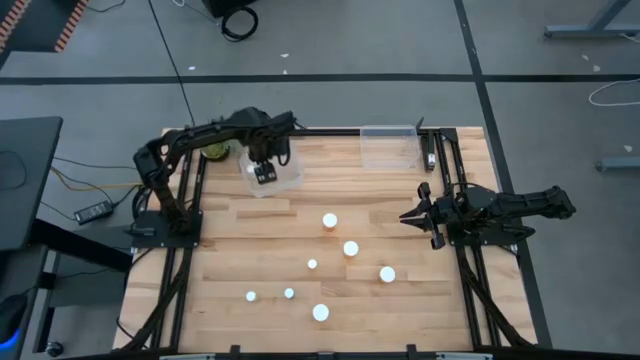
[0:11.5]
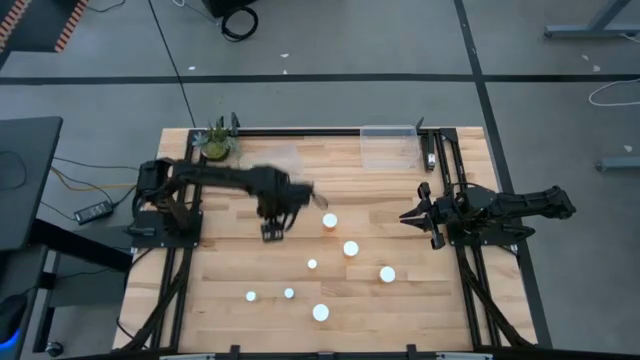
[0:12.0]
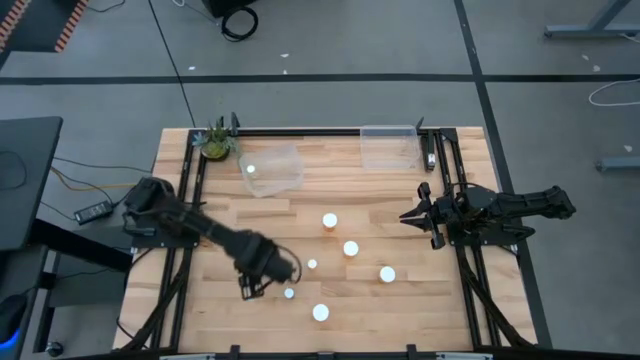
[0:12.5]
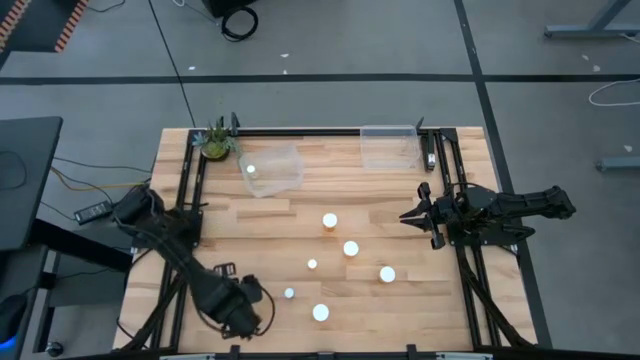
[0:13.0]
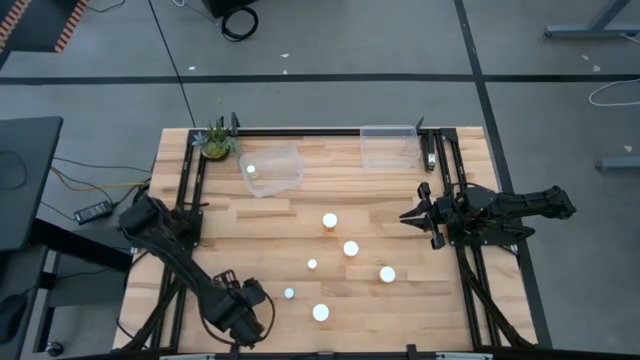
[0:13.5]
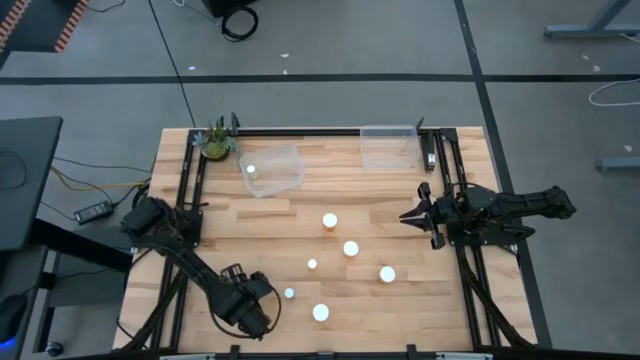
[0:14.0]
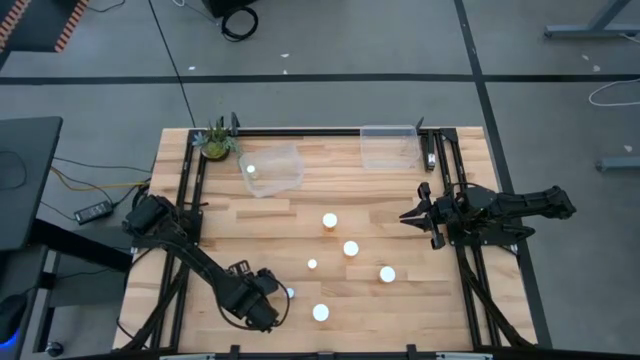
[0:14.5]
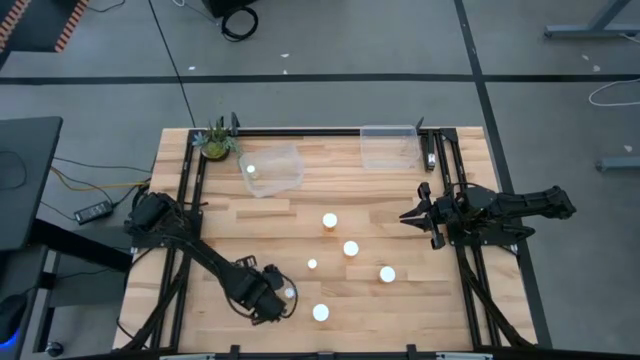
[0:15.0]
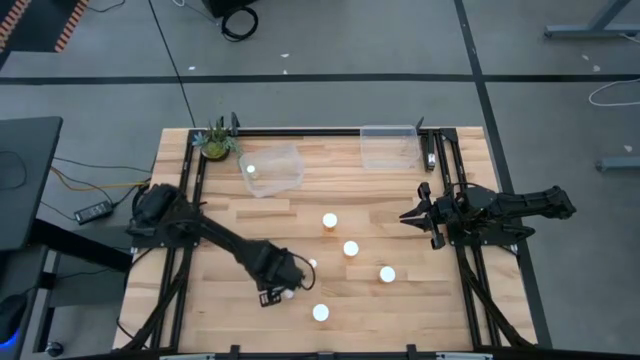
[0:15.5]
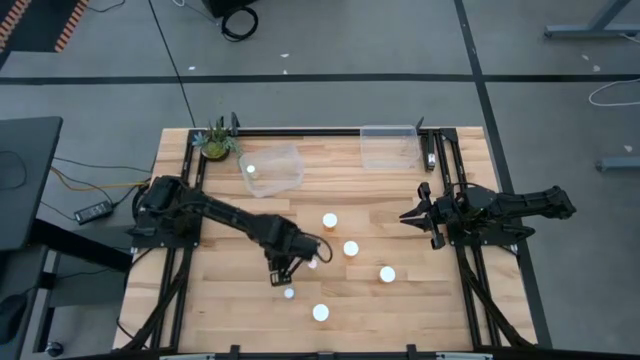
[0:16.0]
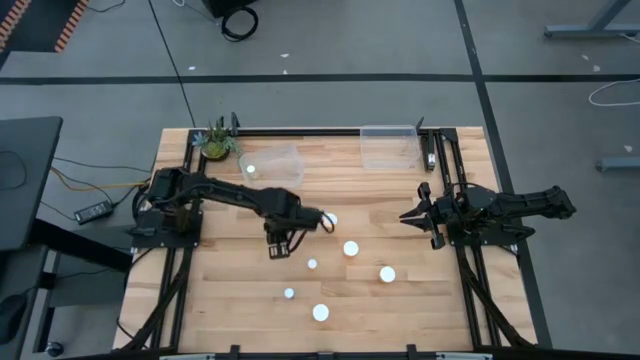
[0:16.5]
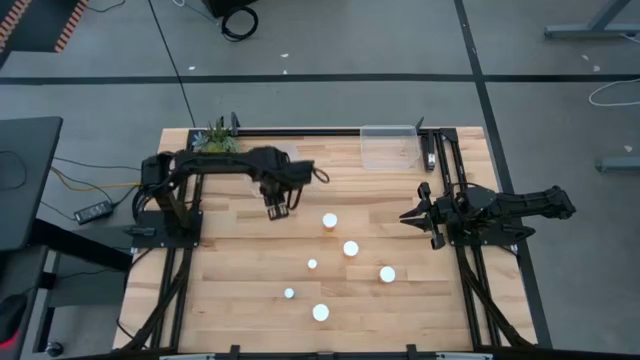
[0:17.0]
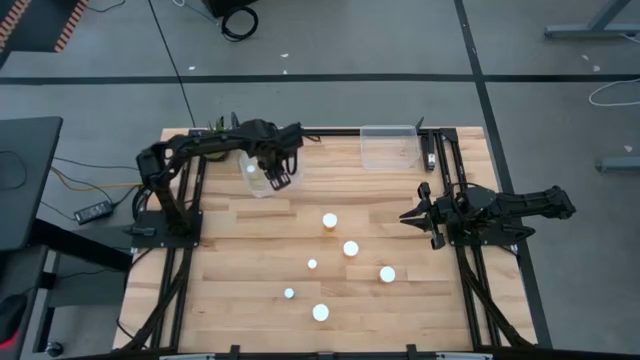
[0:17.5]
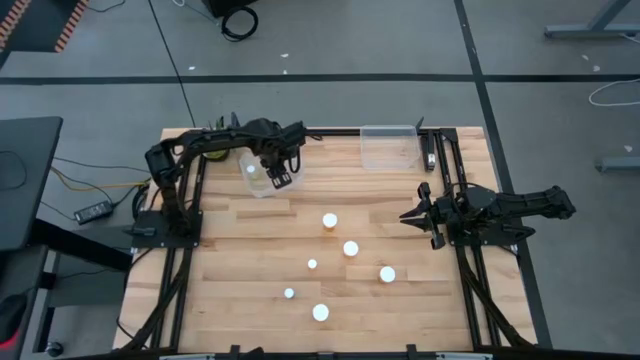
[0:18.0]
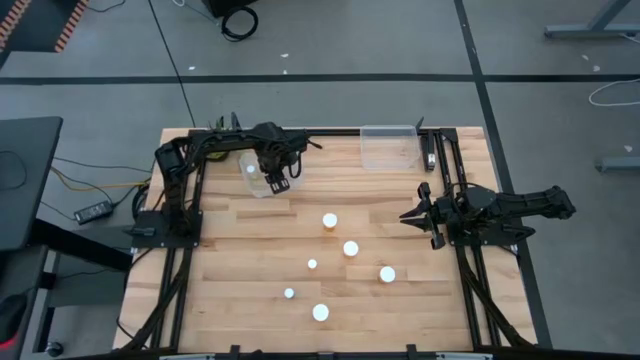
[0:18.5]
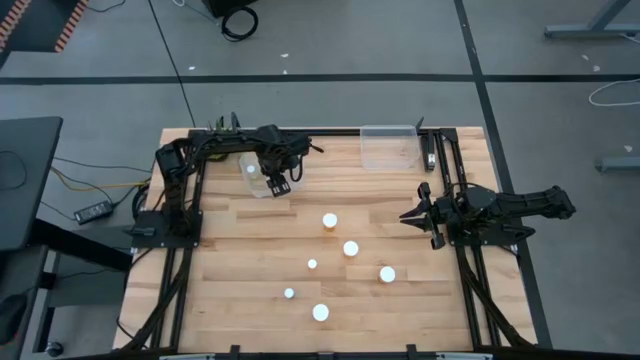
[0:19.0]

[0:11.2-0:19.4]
Task: Pick and place medicine bottles into bin by pill shape (circle, oval)
Put the small yellow pill bottle into the left transparent bin

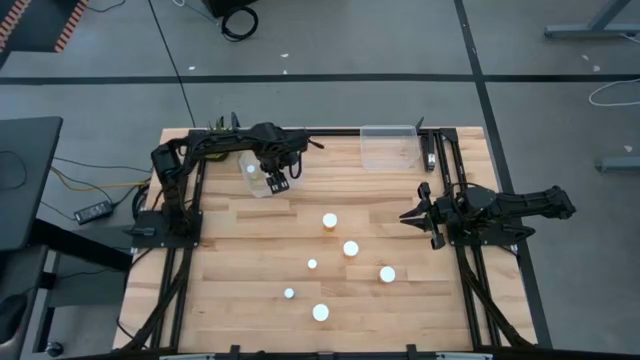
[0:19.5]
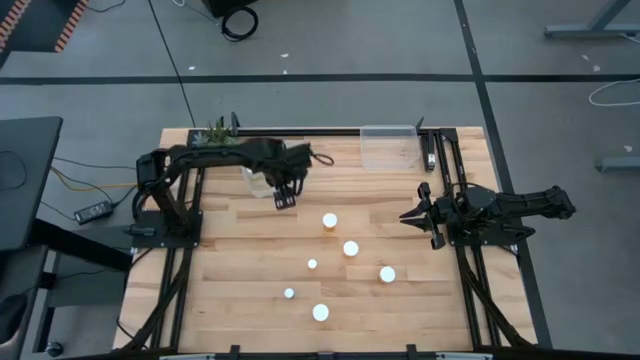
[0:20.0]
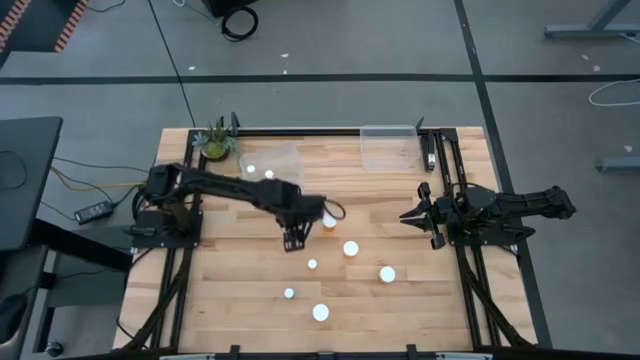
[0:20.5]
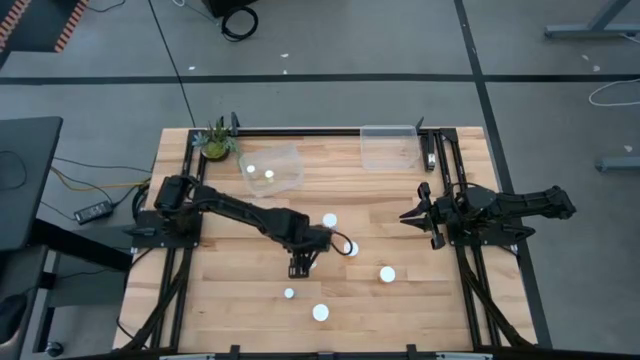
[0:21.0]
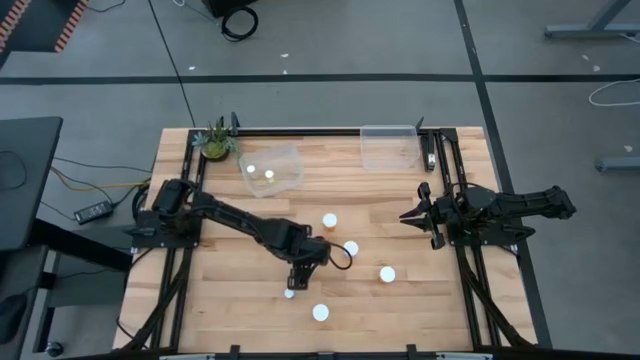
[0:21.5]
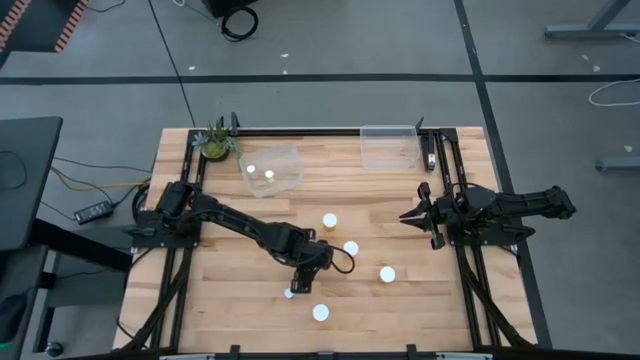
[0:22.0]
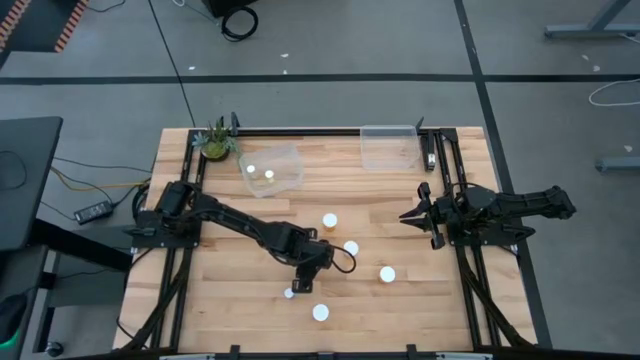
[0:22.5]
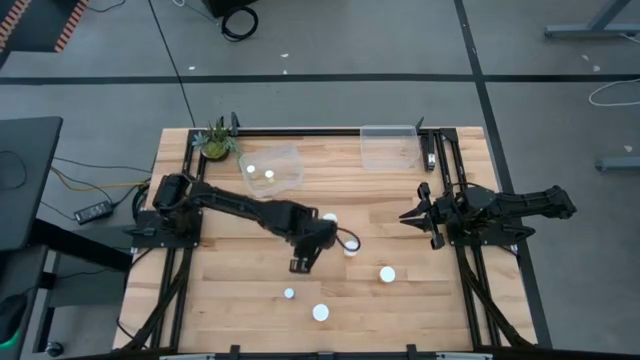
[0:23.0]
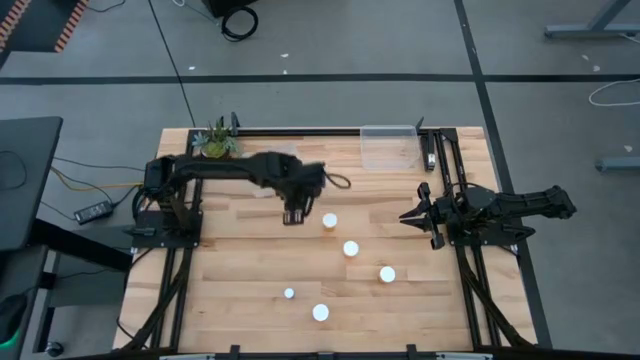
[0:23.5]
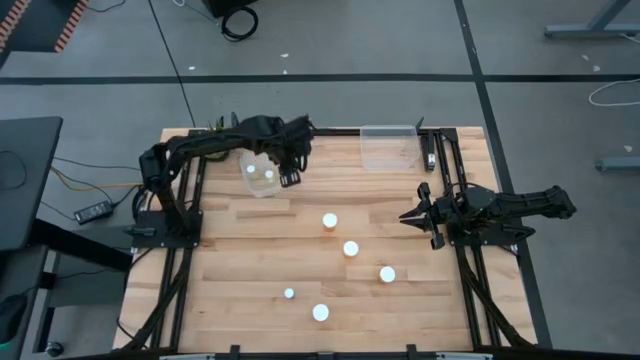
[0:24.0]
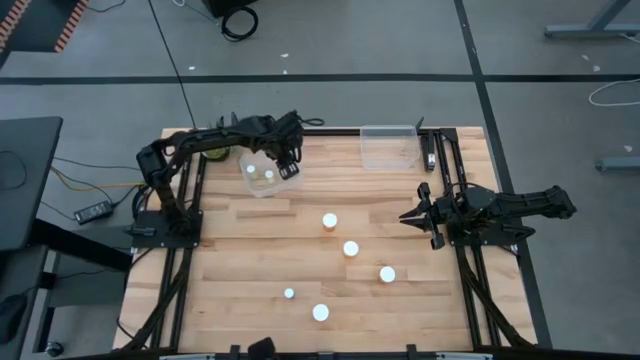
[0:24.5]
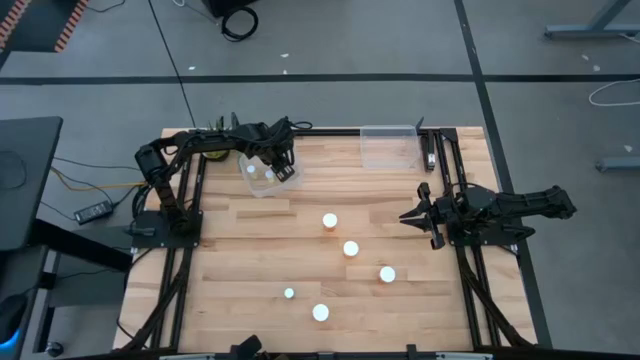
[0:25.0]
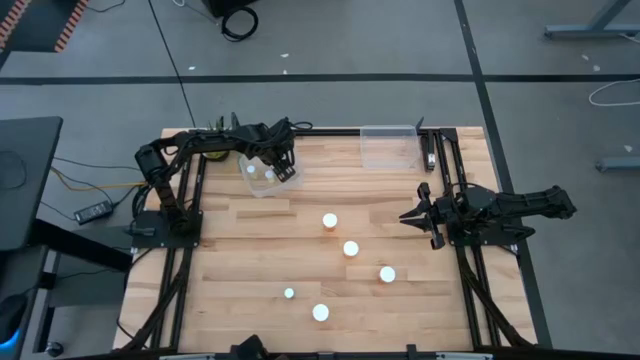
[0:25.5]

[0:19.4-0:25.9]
Put the small orange pill bottle into the left transparent bin

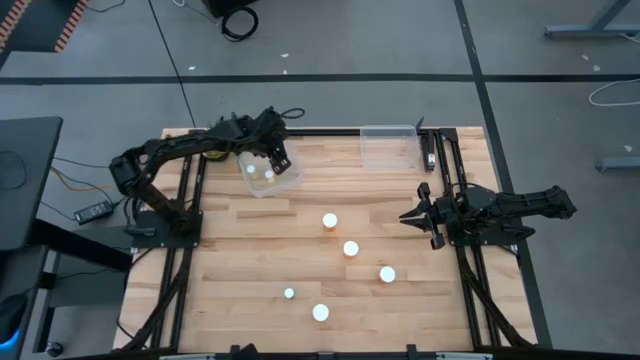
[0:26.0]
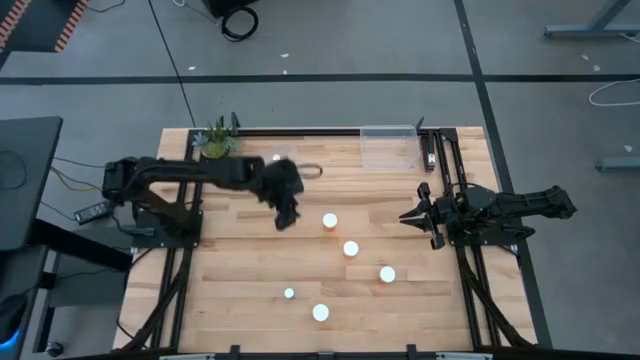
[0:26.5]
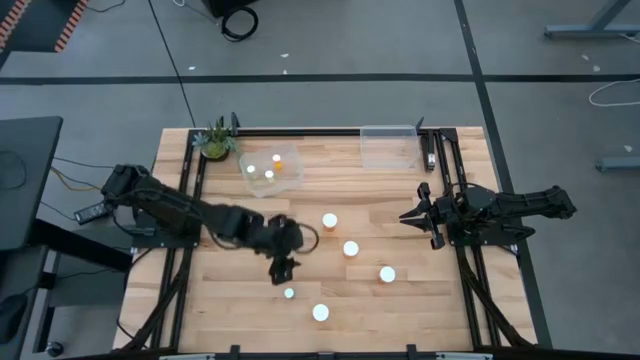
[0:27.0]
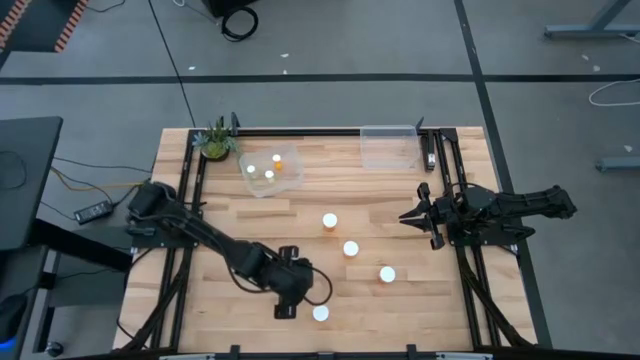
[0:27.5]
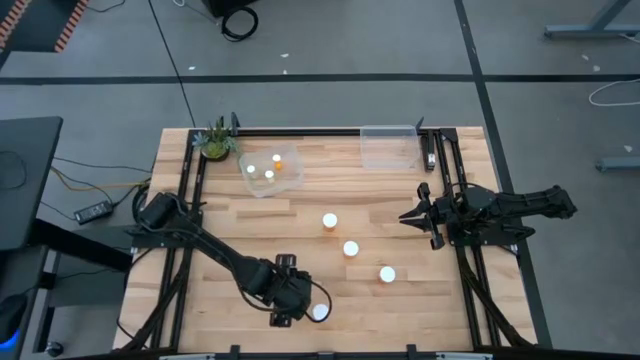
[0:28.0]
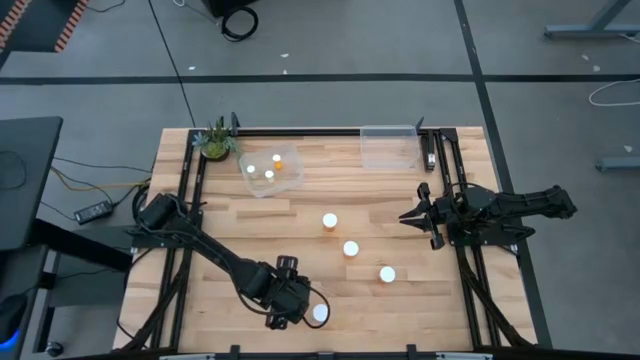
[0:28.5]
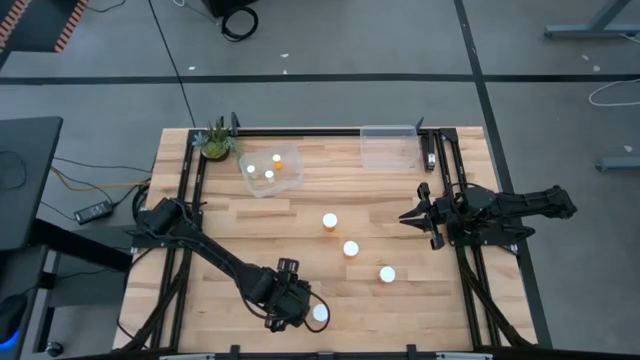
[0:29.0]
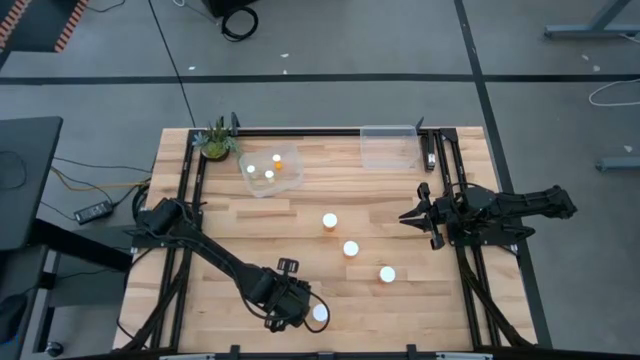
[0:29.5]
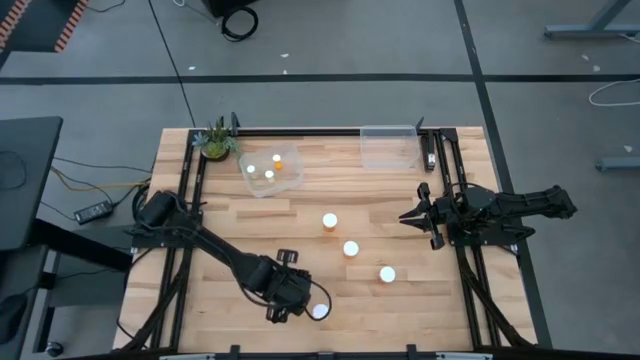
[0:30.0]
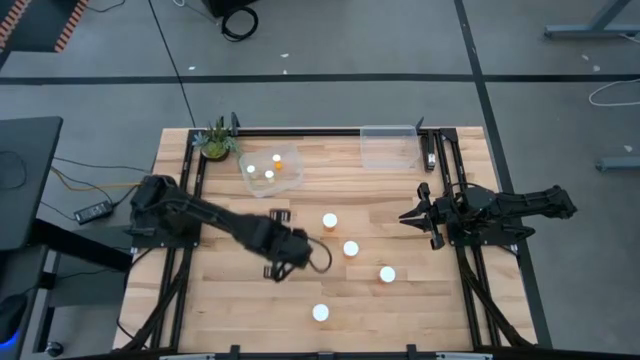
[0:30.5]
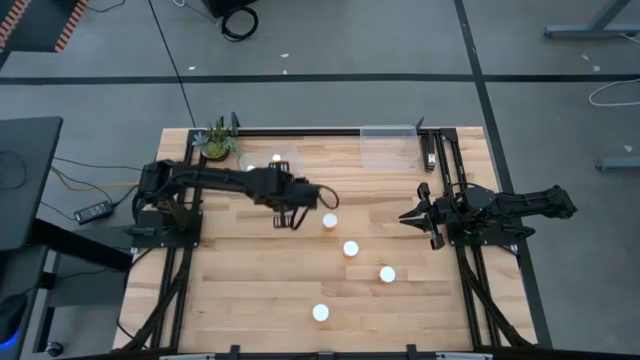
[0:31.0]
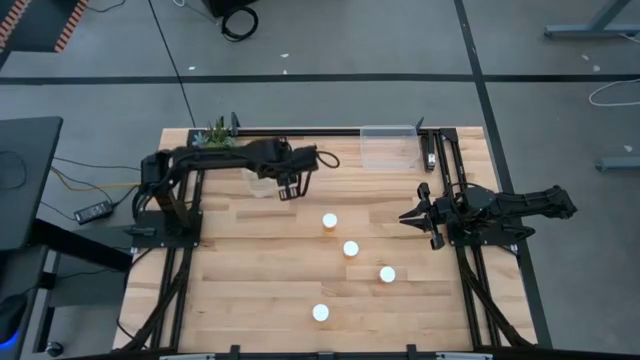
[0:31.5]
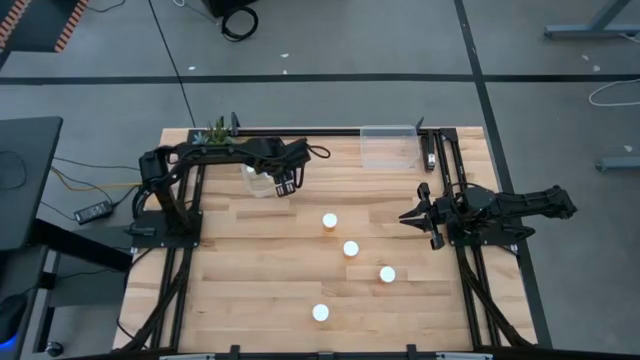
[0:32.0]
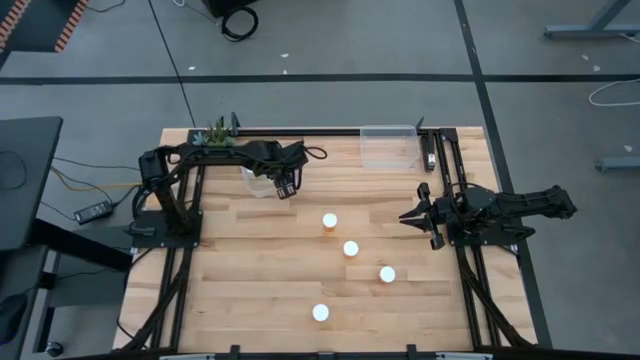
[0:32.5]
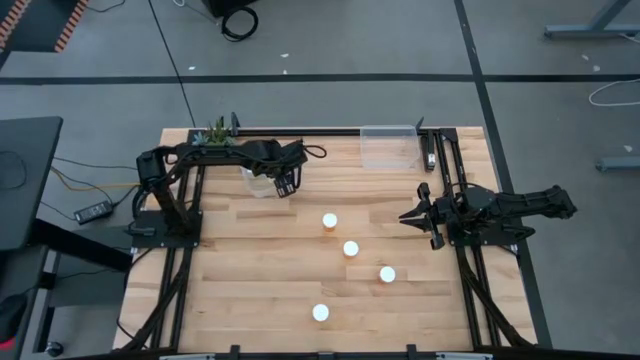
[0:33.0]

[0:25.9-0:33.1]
Put the small blue pill bottle into the left transparent bin
